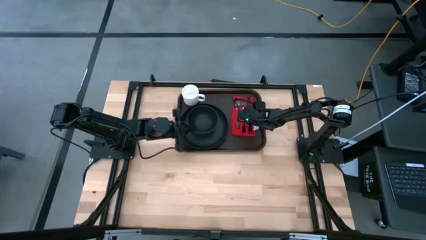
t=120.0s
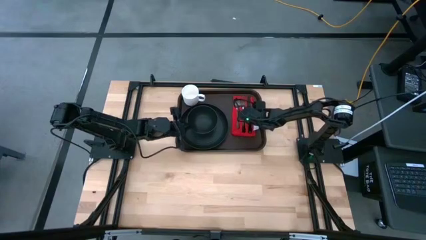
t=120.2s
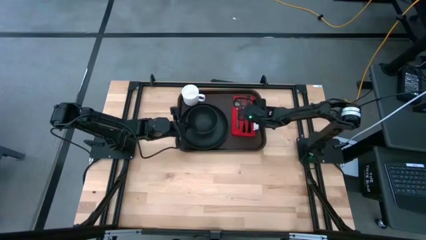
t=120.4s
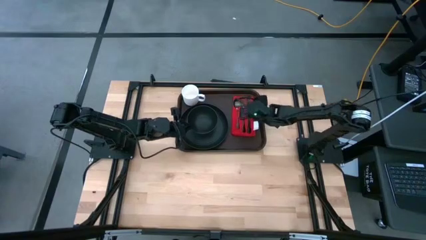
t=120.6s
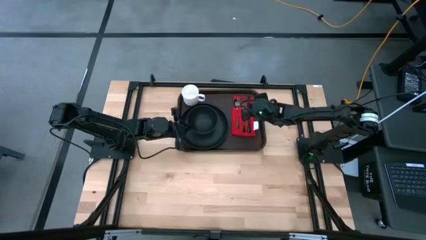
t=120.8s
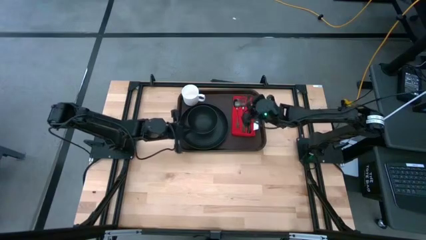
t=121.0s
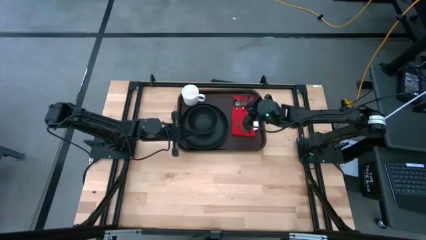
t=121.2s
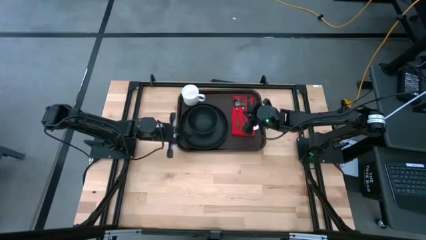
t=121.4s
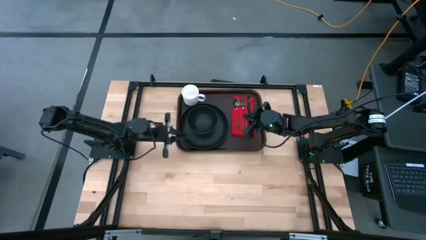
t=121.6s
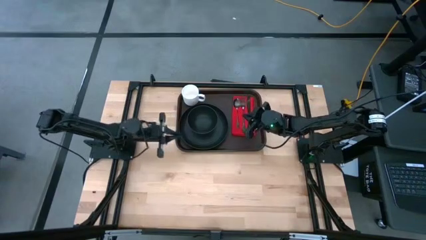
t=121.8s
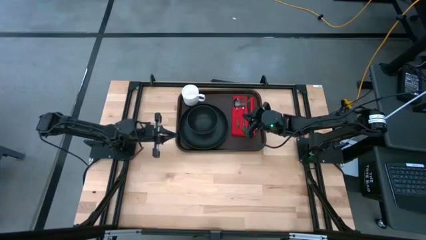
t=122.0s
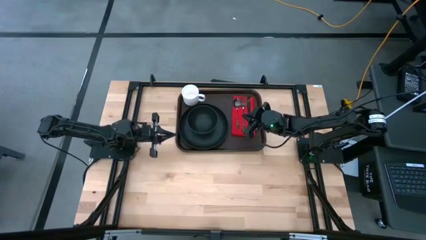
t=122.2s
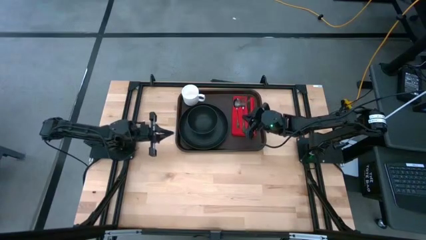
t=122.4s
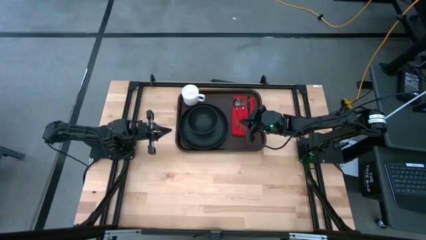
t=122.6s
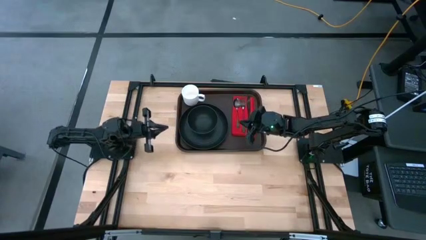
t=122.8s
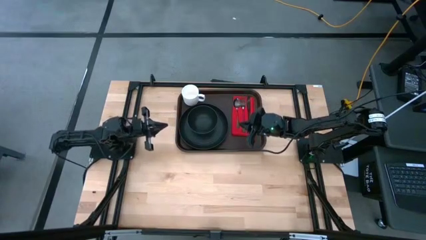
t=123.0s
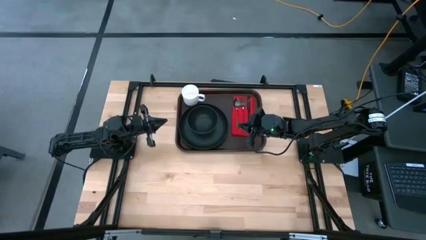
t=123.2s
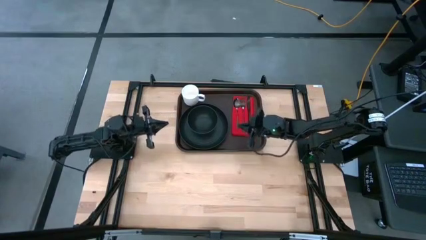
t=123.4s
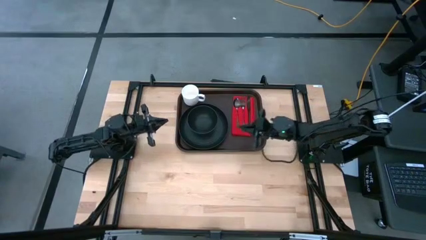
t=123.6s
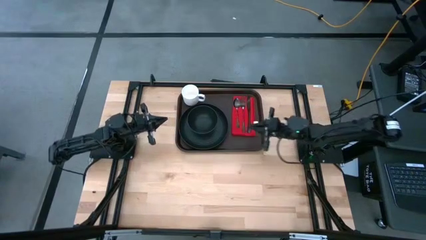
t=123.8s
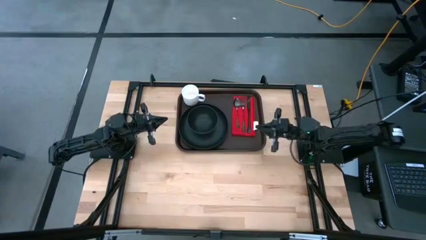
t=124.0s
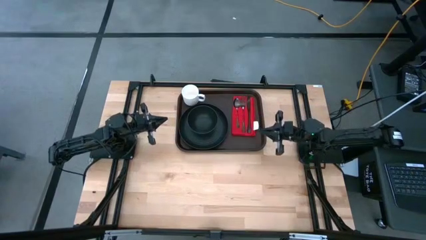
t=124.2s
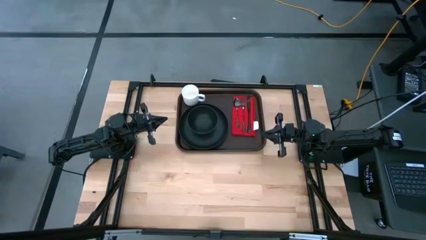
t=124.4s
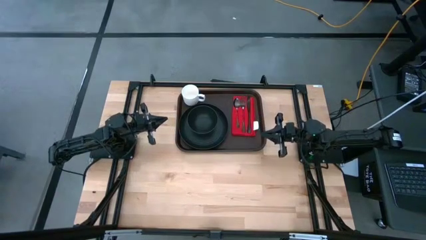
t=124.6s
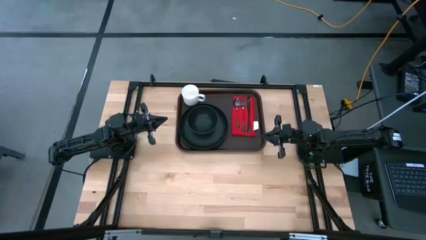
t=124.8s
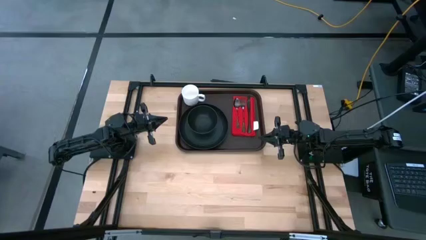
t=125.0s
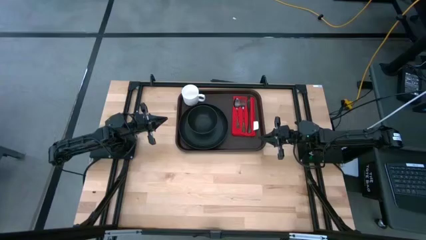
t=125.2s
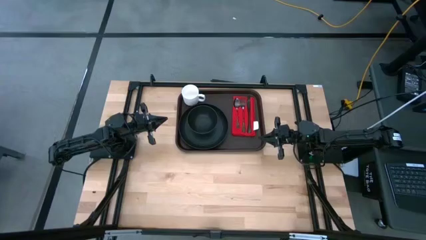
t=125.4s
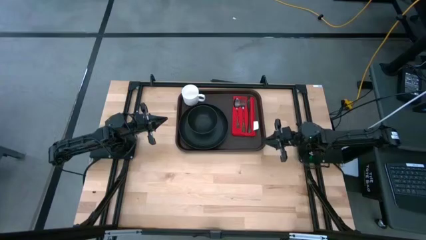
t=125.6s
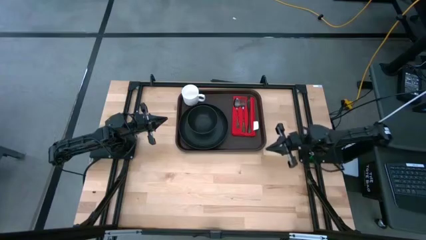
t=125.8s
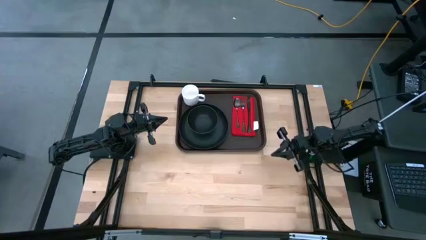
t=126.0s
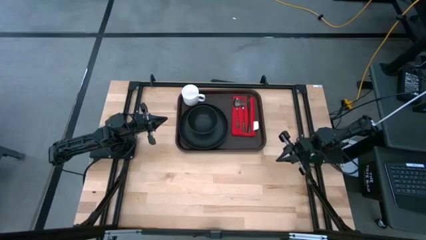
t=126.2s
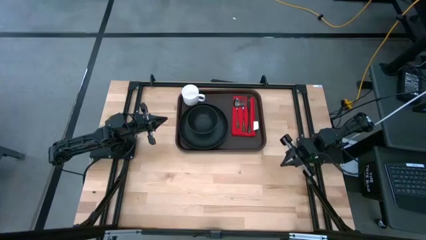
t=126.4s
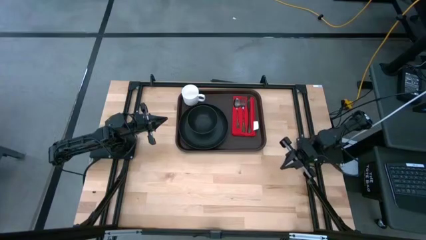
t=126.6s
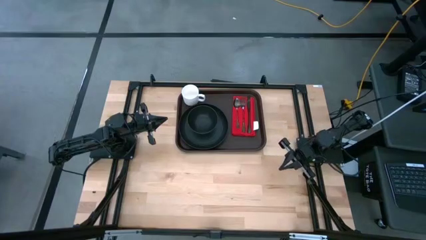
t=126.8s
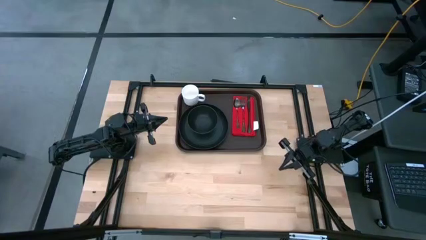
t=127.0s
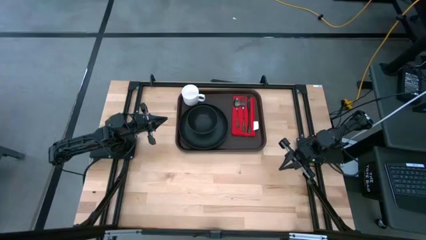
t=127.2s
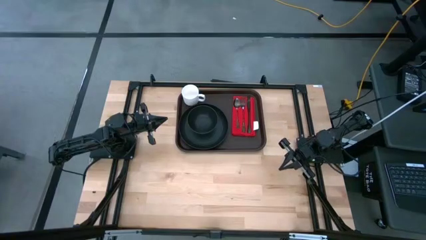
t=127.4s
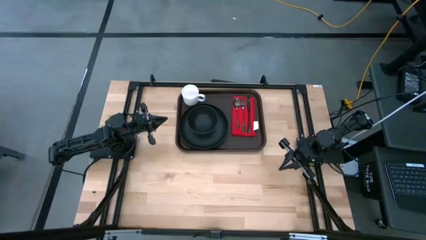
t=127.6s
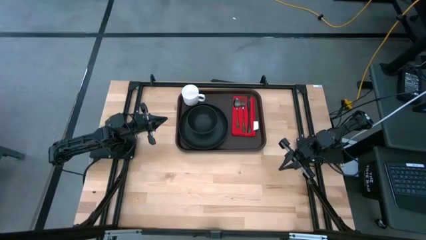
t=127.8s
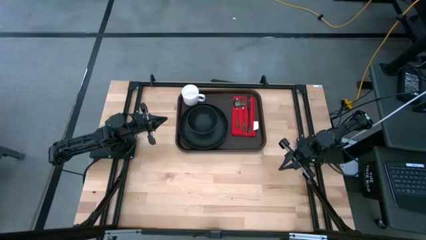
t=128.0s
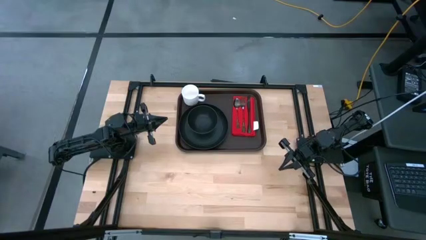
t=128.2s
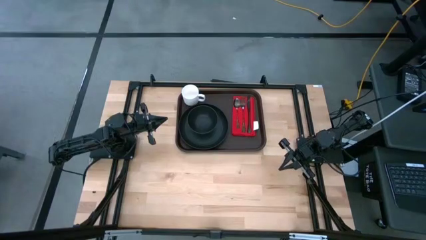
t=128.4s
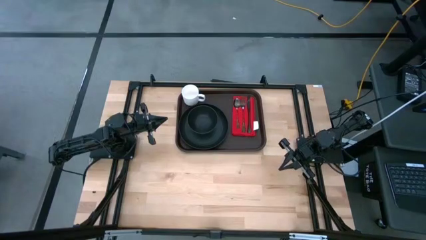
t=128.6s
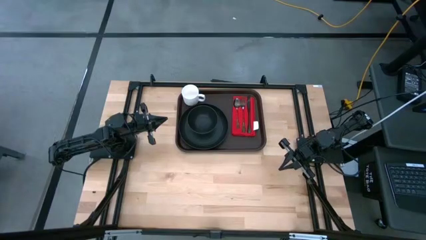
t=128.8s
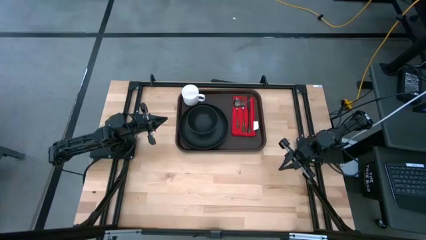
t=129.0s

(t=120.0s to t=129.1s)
Task: Set up tray
Return to Home Position

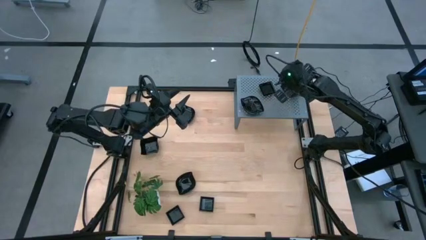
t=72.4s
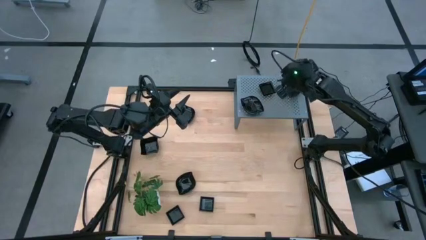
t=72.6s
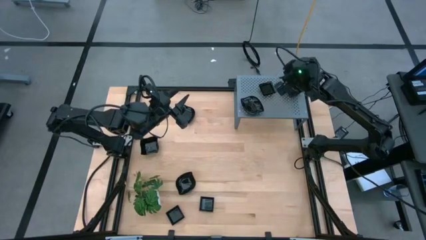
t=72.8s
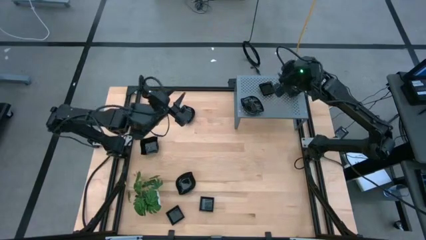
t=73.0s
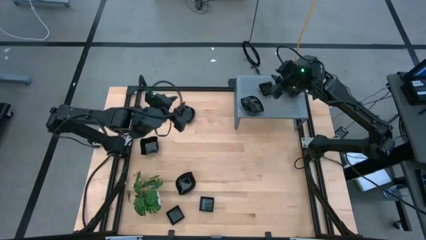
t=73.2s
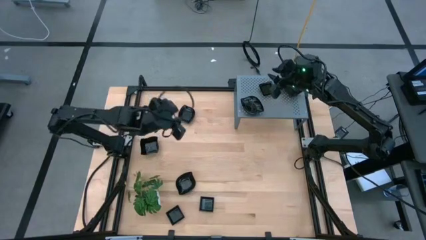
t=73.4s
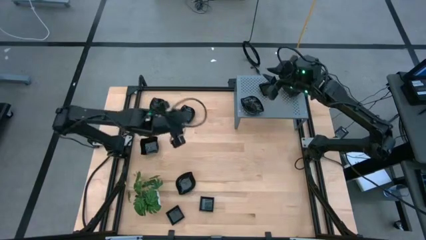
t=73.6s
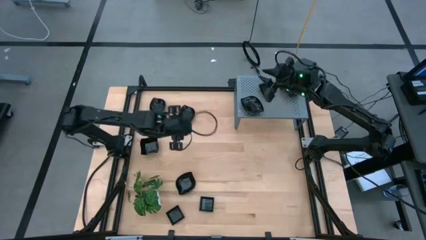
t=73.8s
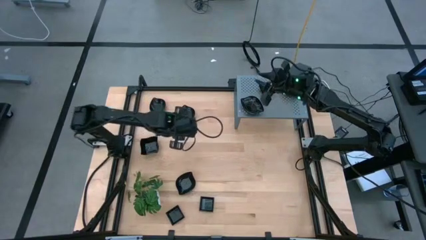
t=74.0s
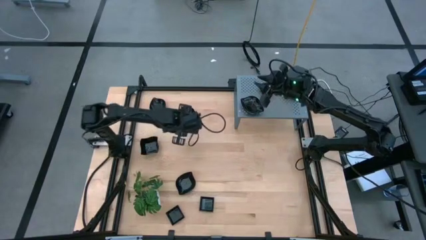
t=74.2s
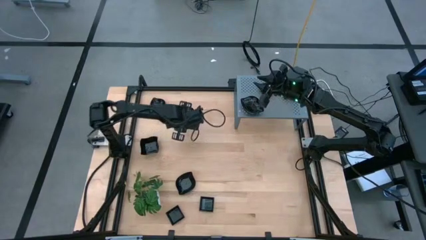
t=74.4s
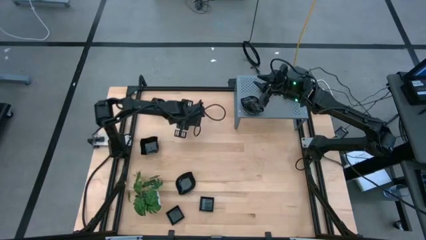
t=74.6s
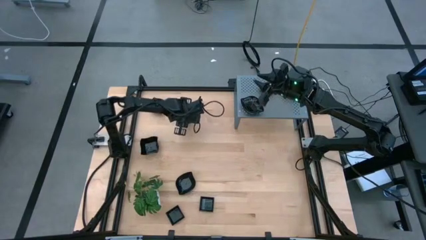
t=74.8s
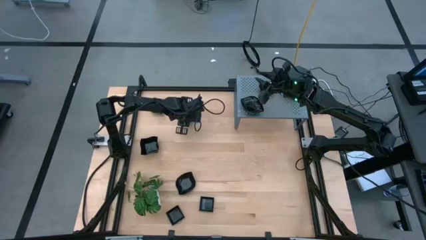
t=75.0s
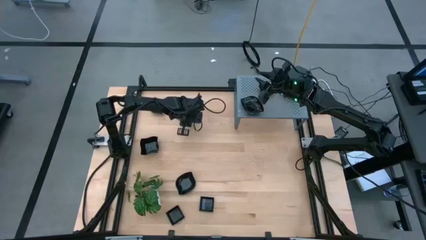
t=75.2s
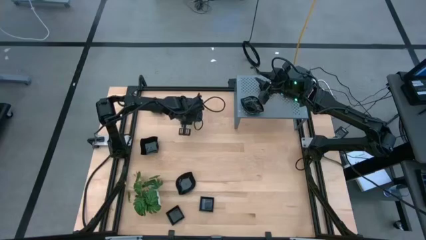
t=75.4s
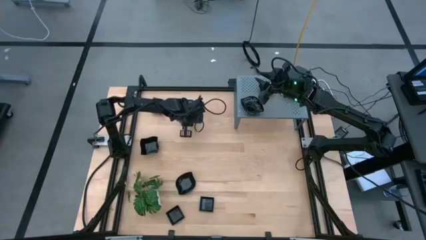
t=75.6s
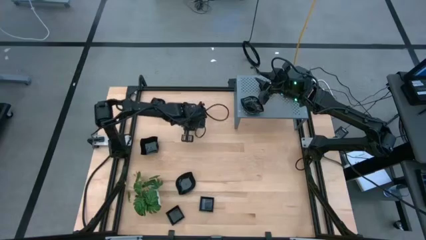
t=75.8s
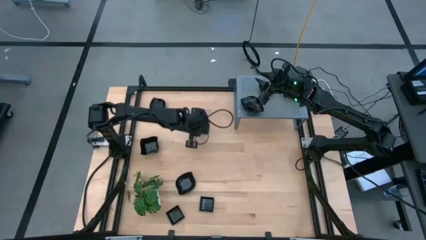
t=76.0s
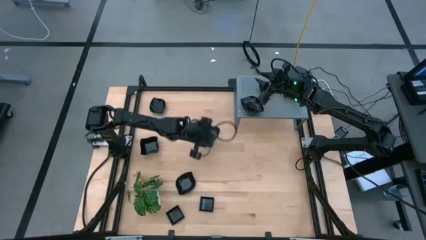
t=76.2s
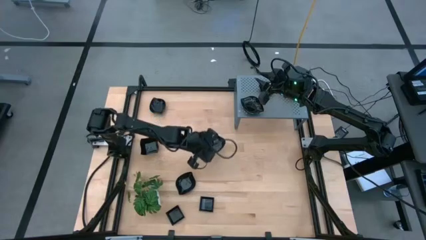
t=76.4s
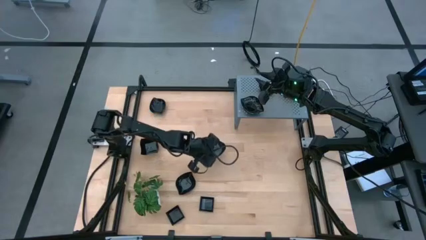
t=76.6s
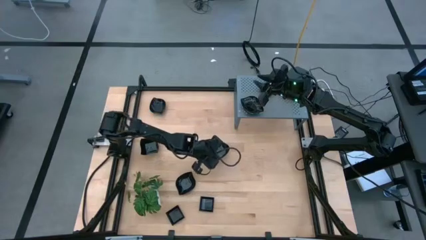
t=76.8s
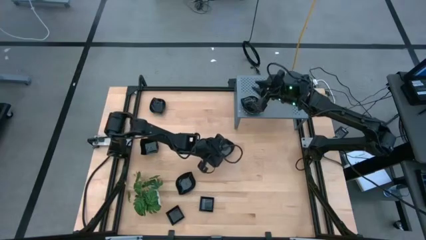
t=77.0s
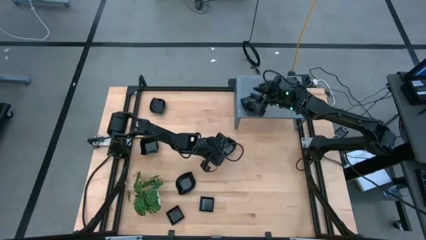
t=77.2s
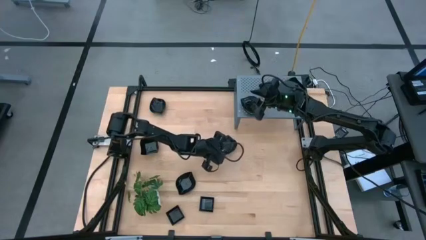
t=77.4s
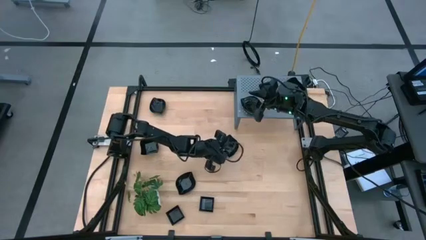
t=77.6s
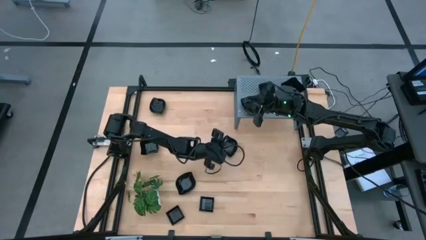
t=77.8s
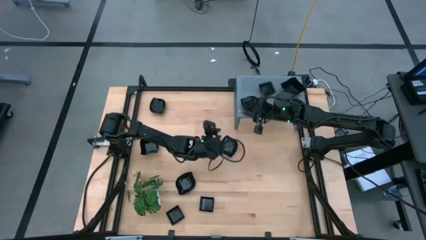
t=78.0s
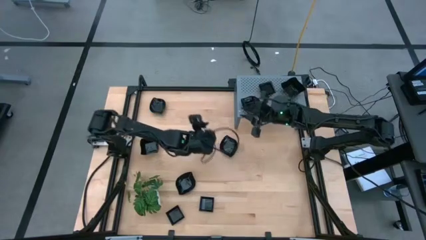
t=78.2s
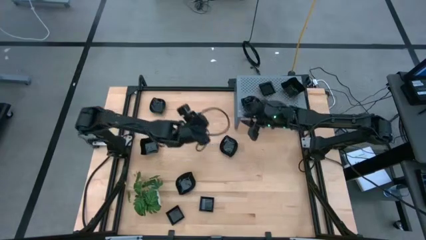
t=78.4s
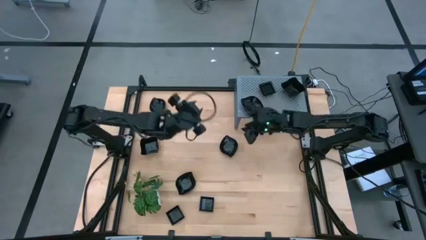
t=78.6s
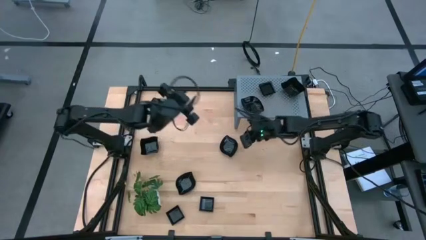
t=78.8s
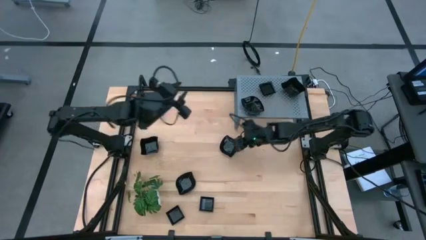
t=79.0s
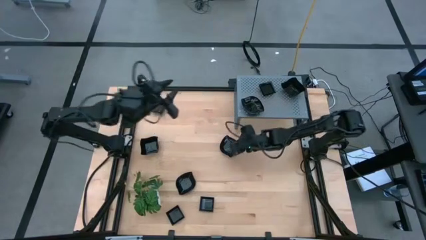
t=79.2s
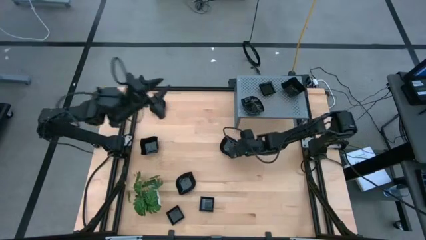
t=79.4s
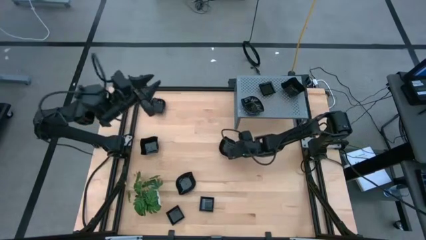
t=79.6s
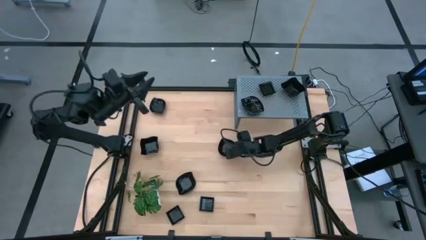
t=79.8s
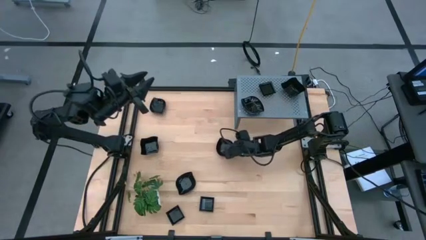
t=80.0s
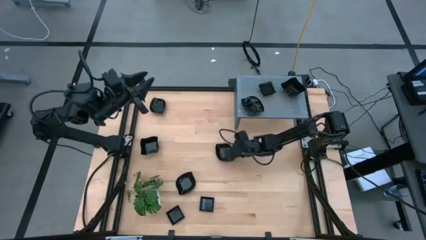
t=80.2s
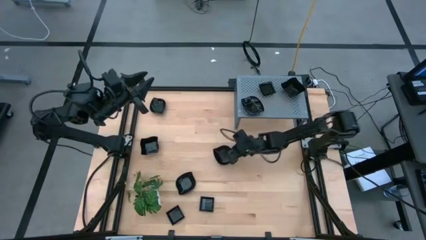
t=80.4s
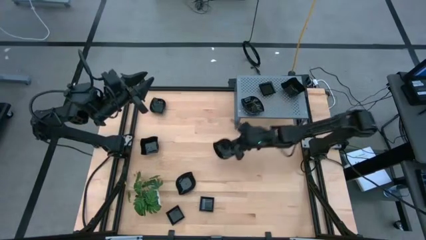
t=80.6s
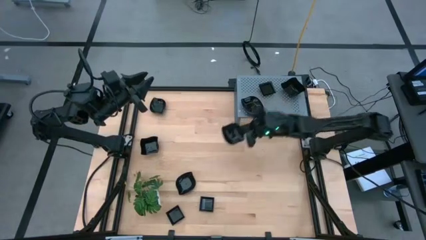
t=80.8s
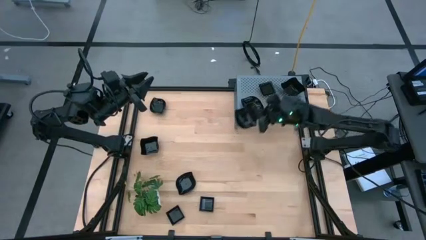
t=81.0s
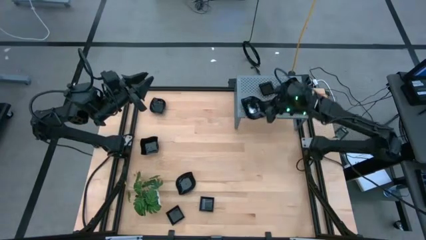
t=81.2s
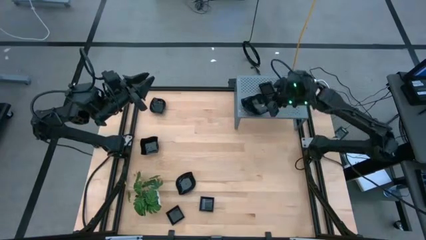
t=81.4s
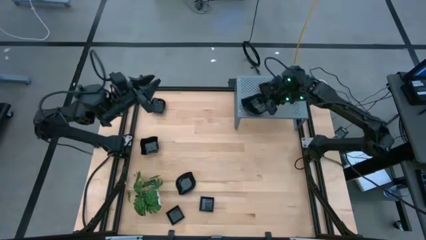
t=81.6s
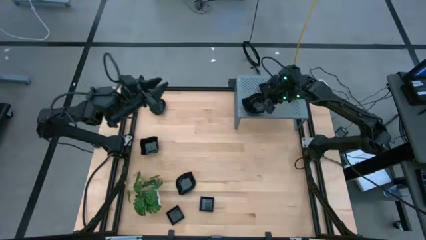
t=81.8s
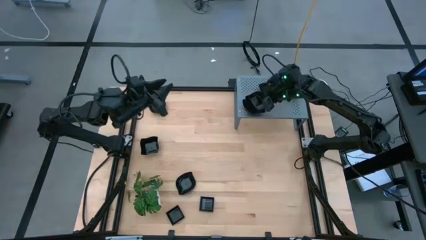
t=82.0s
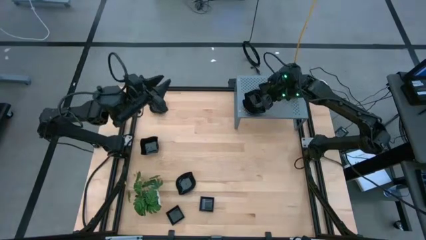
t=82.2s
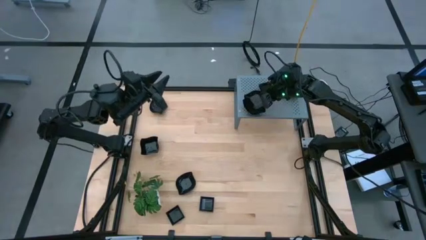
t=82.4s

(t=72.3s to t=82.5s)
Task: Pick & Place Mini shaped plates
Stack the leaf-shaped plate on top of the other leaf-shaped plates
